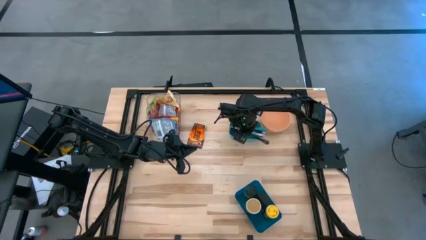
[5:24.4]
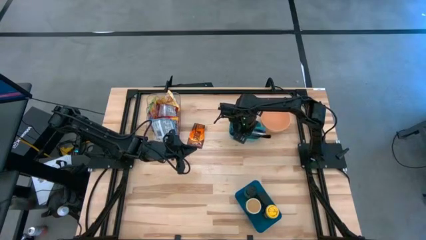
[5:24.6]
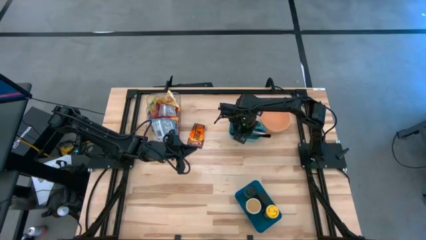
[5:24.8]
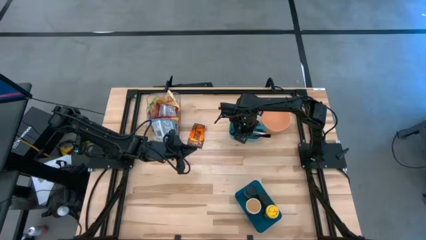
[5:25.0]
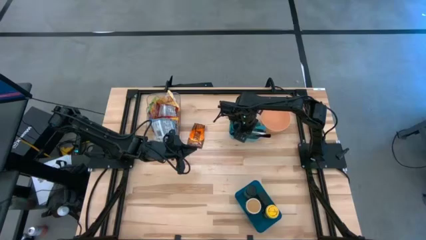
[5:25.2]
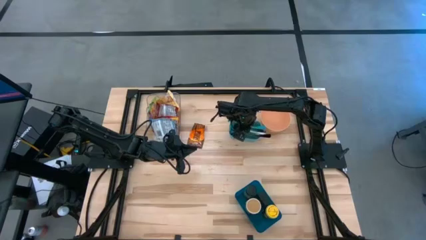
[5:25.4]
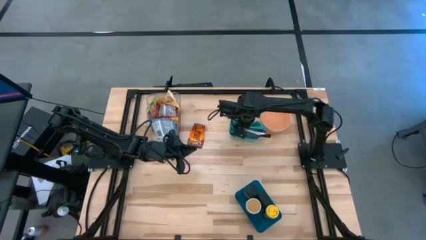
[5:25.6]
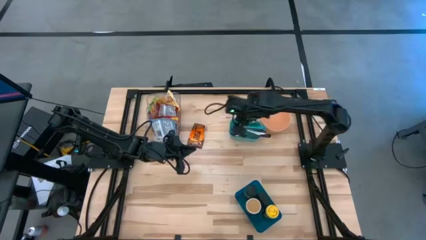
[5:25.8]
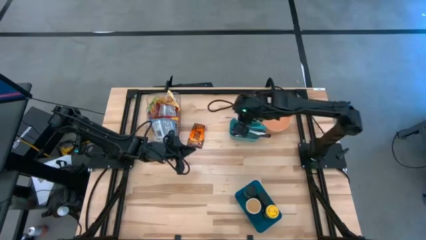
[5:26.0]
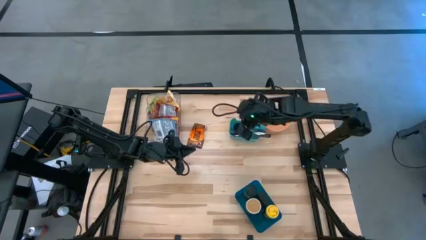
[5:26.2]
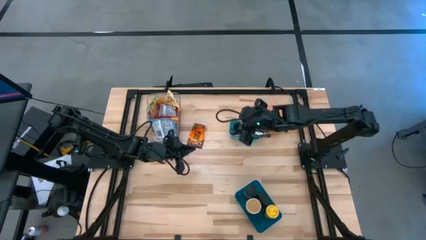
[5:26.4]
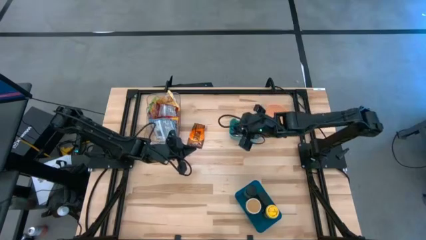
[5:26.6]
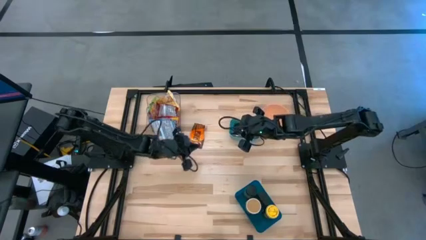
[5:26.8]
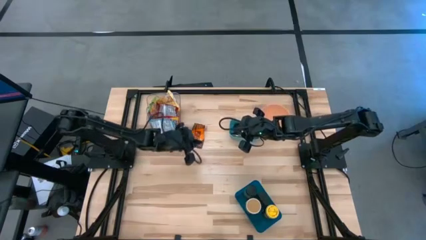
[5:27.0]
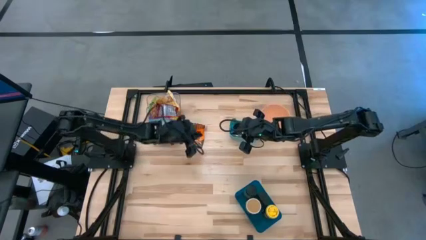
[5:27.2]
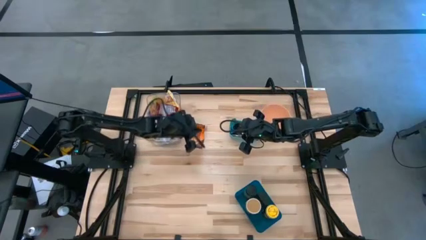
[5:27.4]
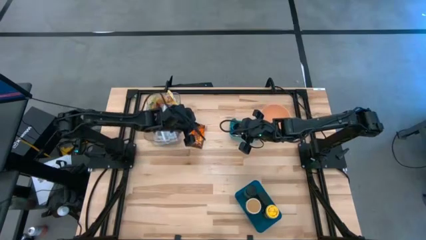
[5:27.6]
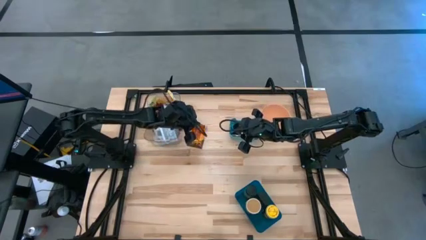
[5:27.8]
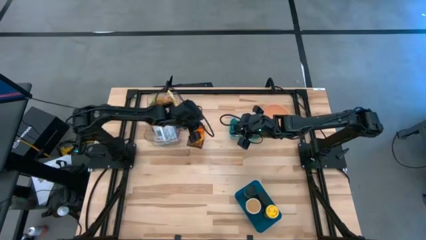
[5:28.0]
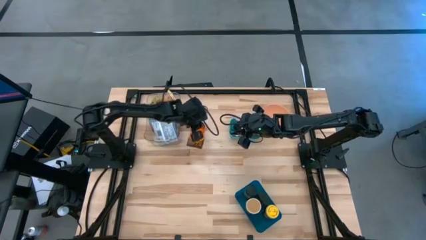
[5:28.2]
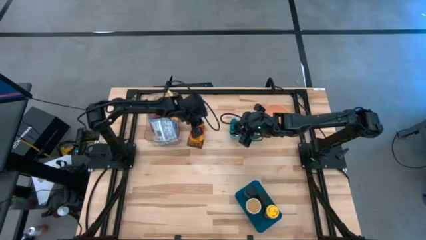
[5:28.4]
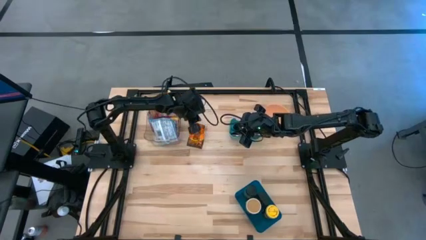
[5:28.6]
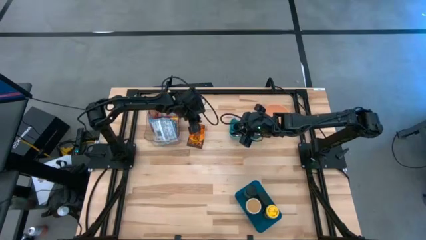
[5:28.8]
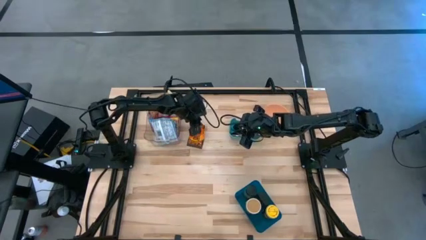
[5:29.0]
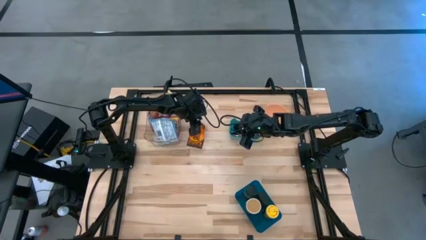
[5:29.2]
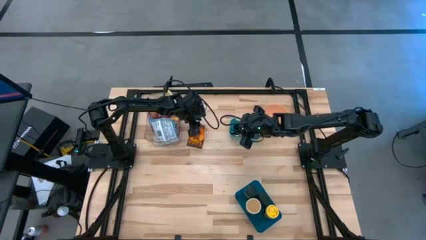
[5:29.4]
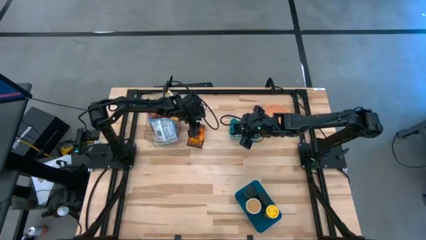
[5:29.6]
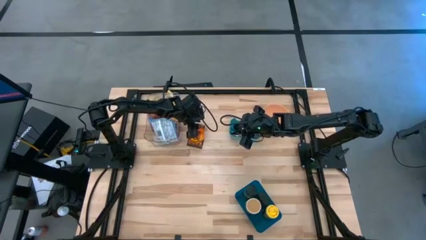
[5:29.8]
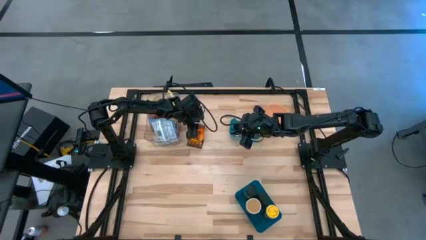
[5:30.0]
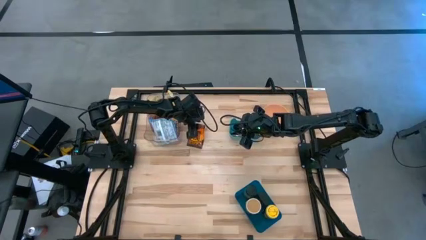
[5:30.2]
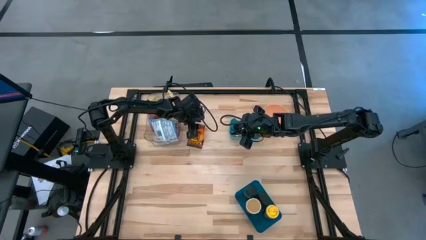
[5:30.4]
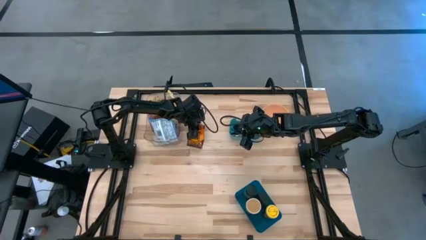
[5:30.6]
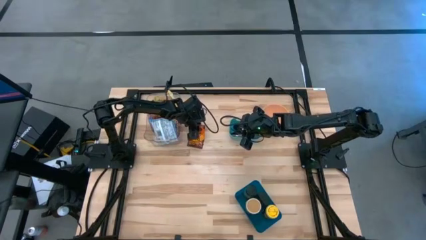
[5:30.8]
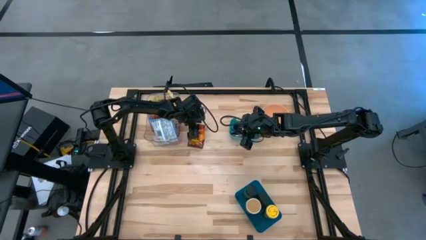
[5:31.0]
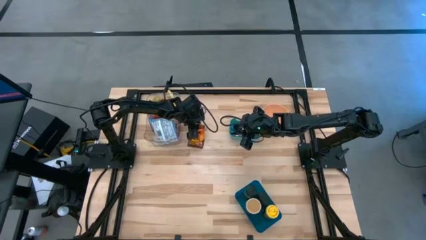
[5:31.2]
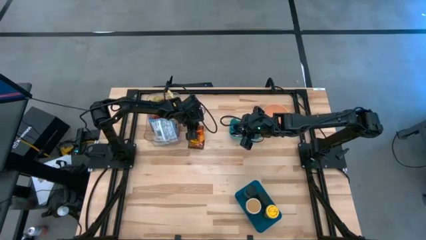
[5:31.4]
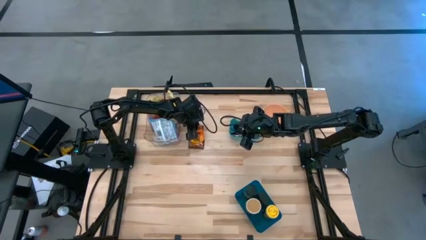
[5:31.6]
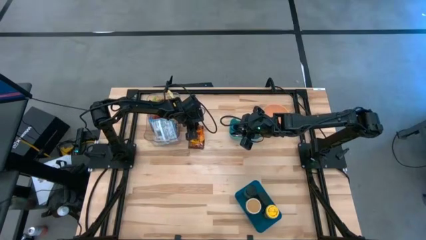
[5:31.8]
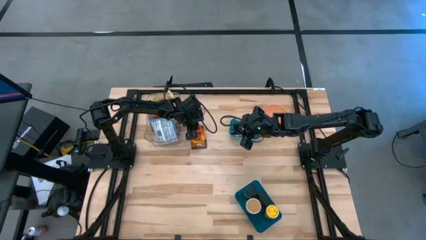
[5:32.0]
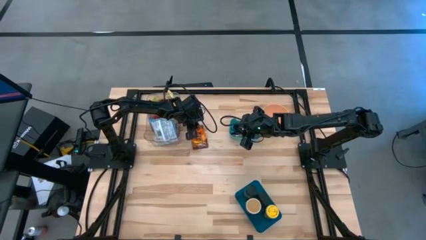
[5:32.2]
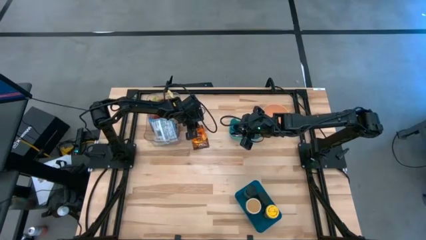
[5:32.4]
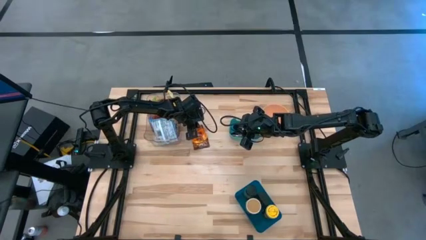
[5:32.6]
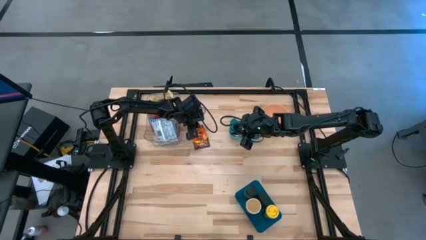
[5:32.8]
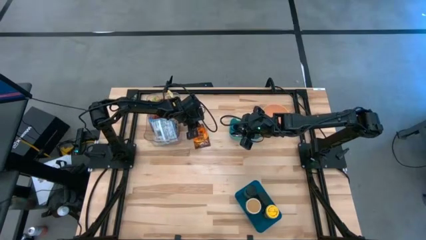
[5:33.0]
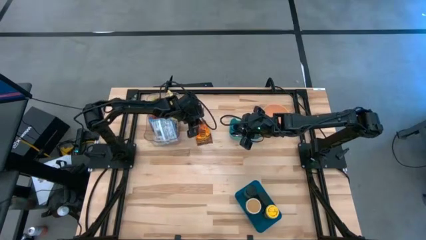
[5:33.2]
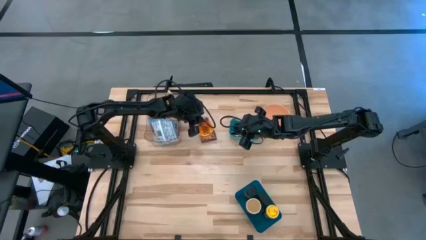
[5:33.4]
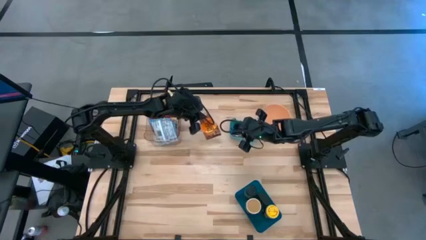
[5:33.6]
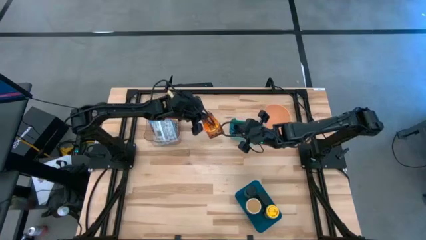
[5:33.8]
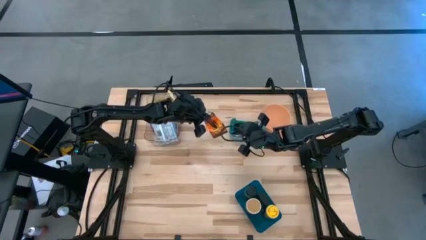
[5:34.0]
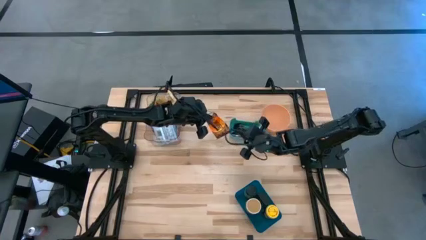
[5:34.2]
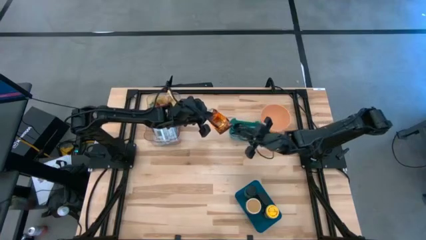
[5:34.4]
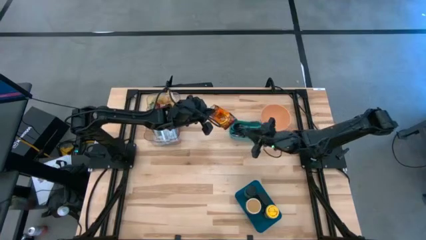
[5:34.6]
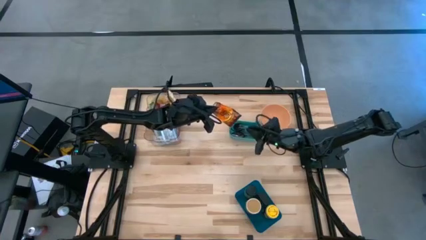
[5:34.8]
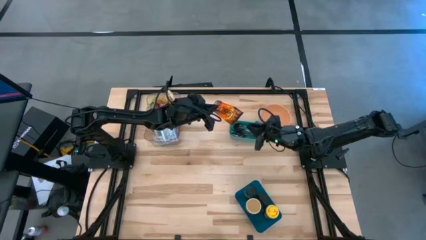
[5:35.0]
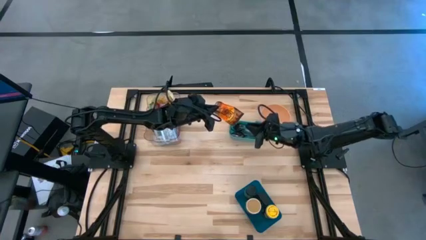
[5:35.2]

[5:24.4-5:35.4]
Task: Pick & Place Food Item
Put the orange seasoning pack into the blue bin

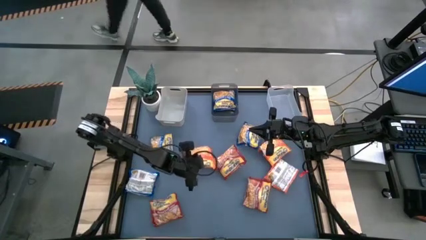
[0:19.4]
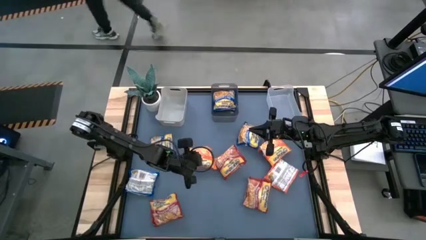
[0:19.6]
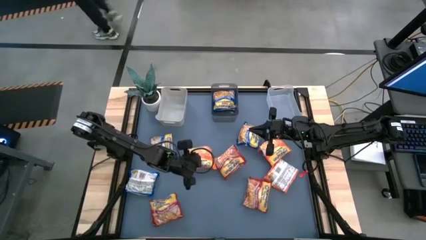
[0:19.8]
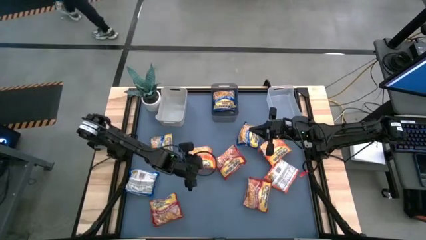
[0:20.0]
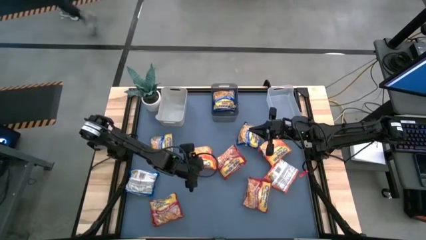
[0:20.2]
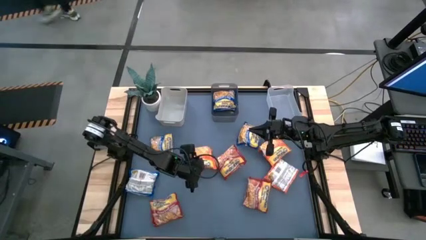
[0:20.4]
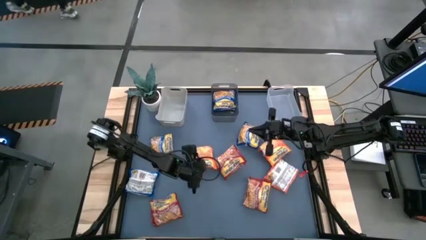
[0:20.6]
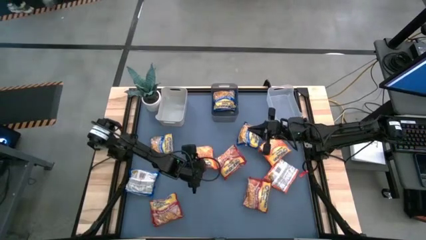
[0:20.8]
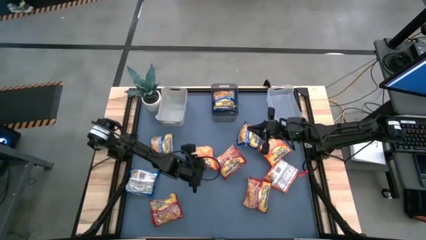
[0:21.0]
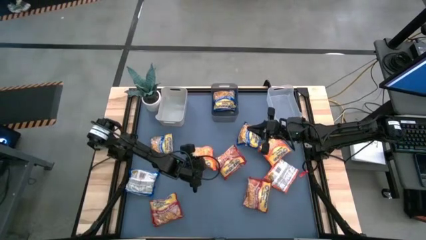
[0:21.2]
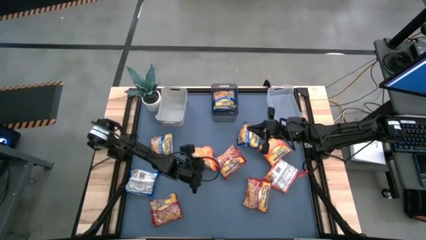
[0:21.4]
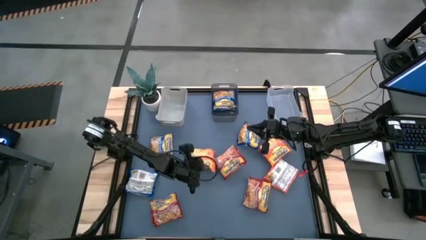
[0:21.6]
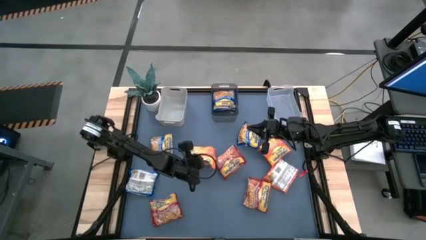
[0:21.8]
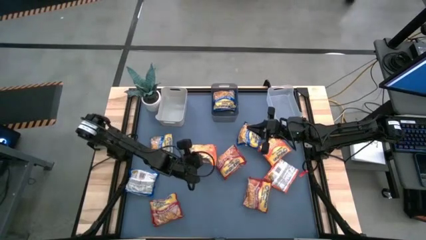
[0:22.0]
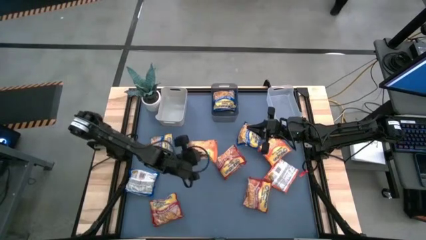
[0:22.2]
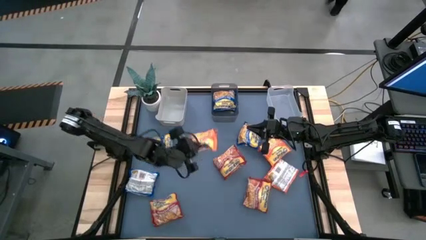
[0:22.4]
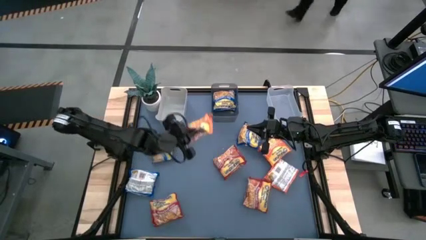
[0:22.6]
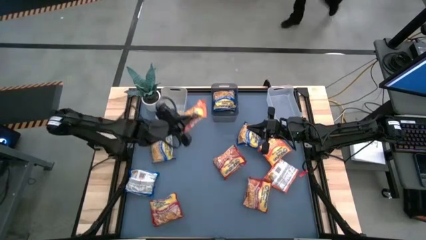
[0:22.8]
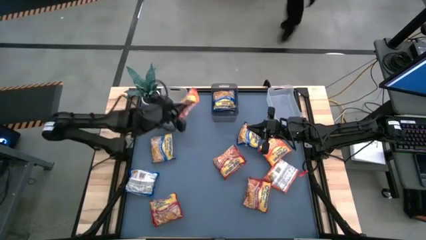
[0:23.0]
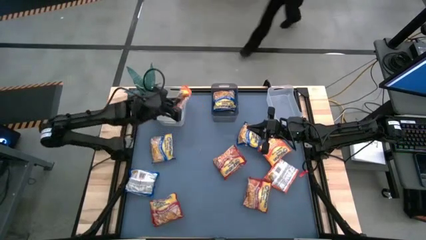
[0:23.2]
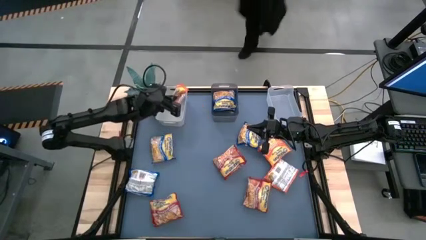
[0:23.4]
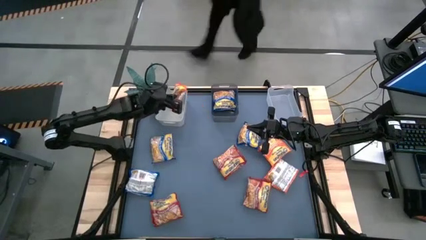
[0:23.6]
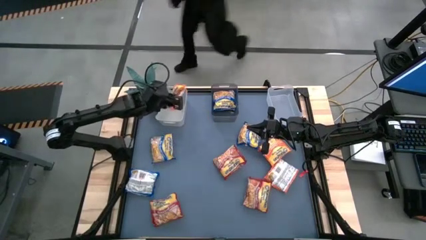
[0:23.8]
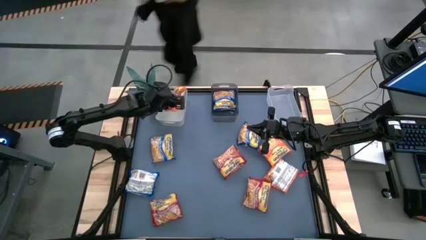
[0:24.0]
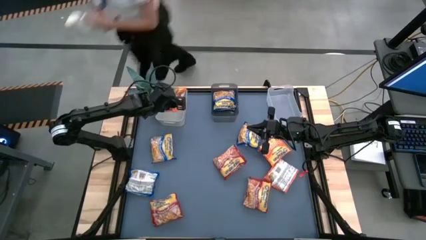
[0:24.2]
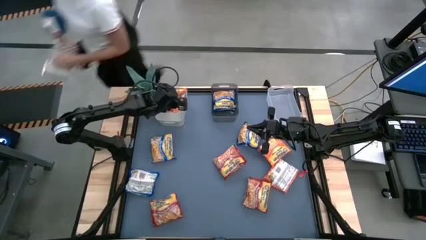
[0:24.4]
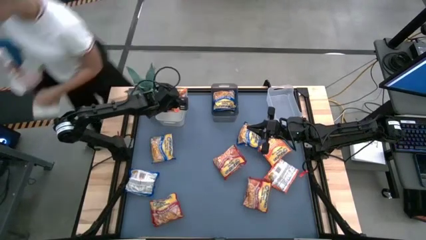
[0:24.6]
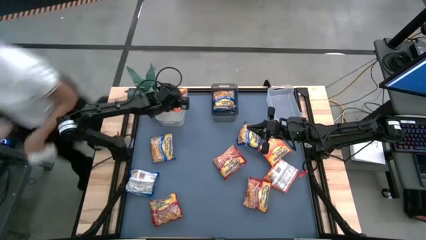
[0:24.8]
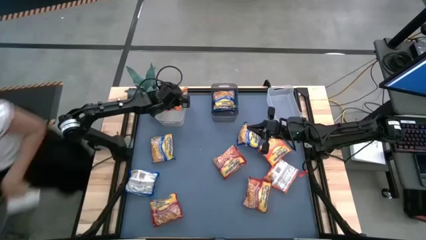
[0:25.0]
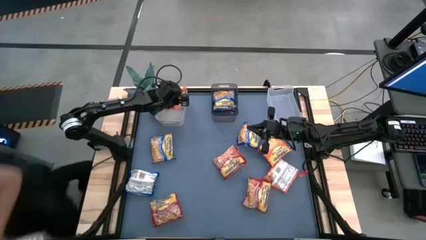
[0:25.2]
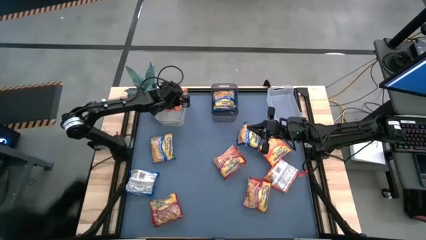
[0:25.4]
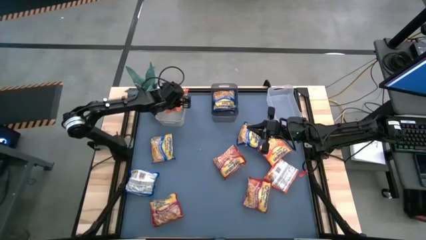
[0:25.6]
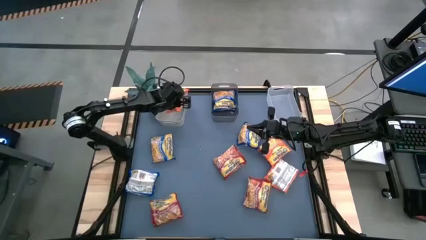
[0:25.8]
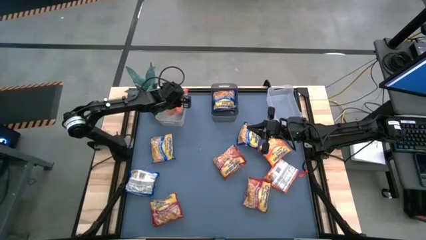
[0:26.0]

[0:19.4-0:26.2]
Task: Sort Maruchan noodles
Put the orange noodle pack into the gray bin
